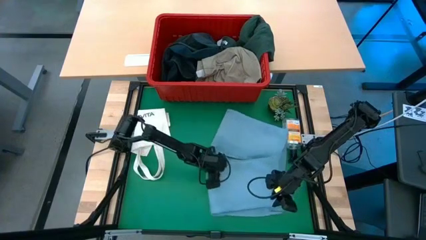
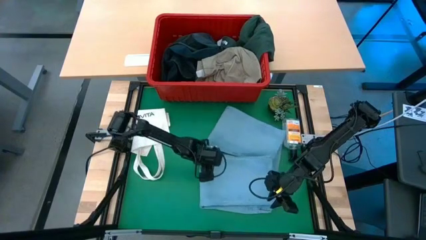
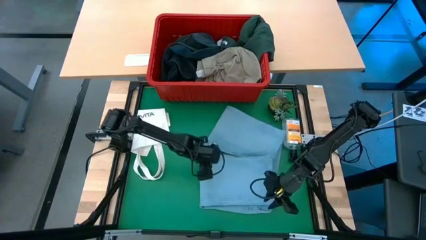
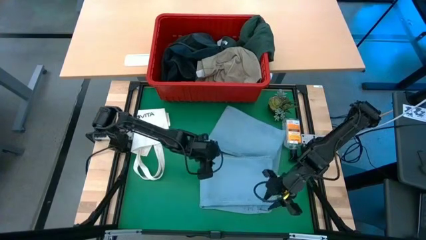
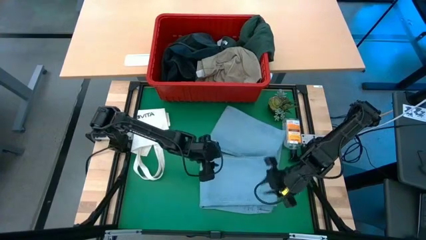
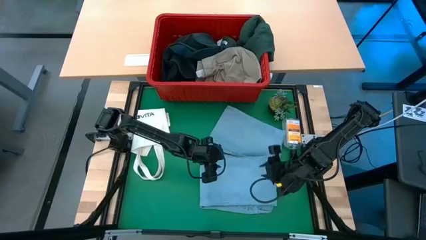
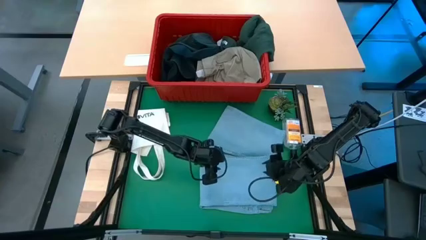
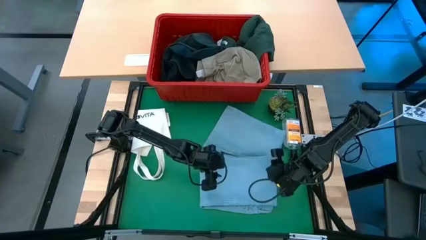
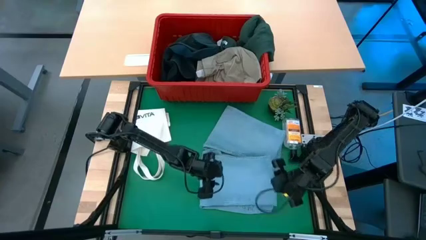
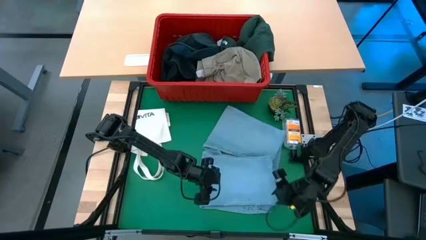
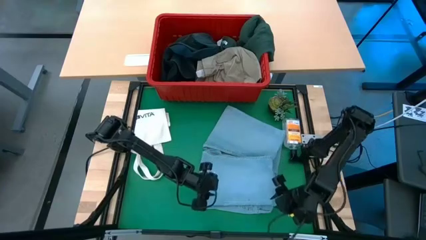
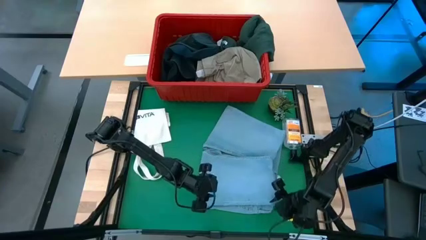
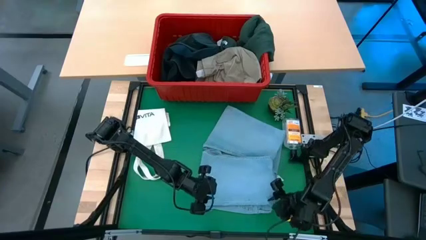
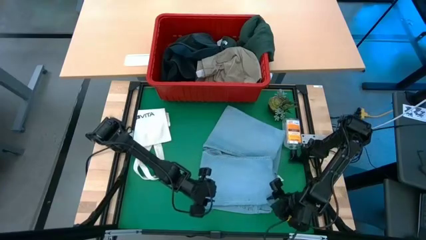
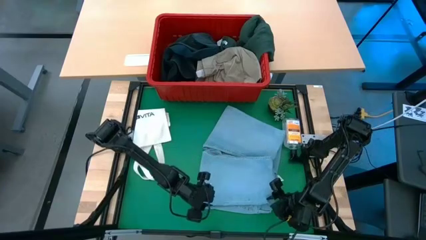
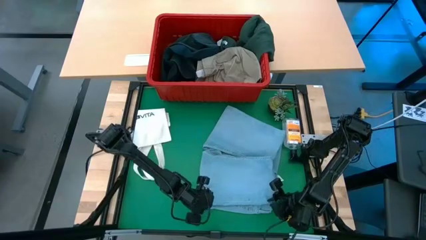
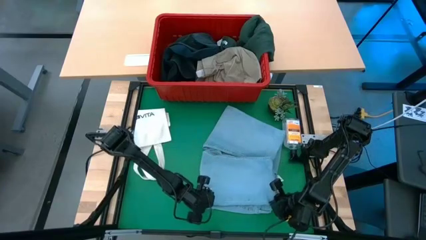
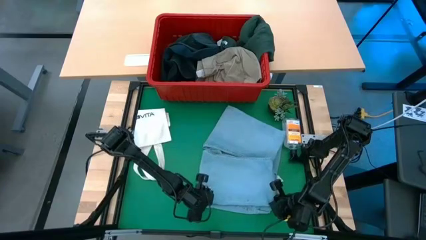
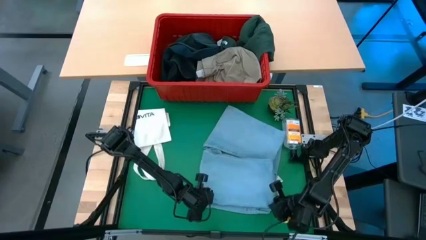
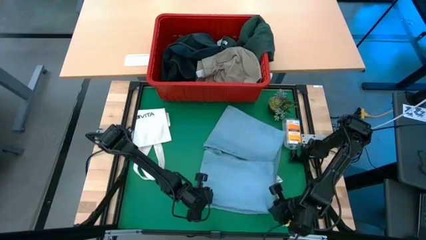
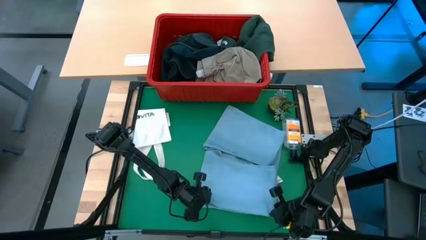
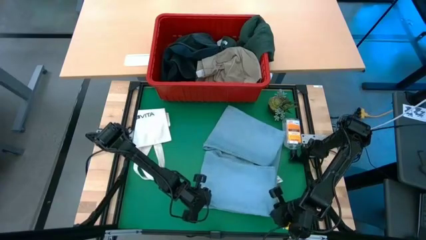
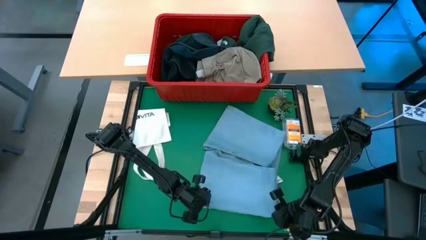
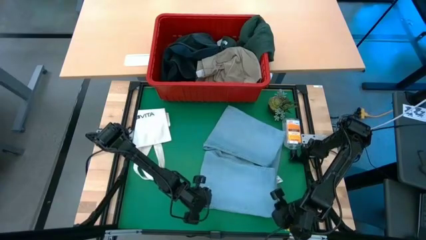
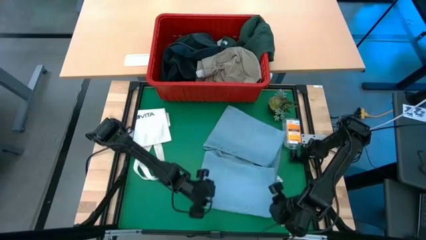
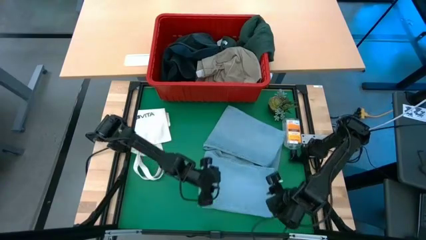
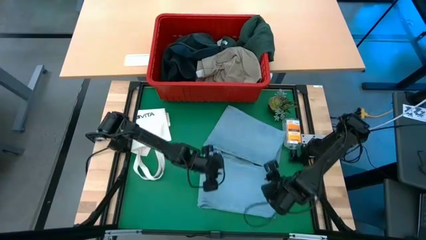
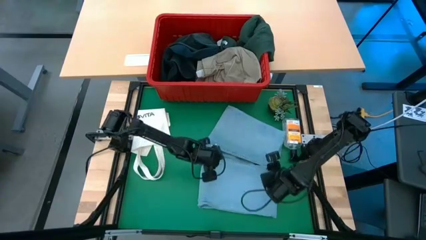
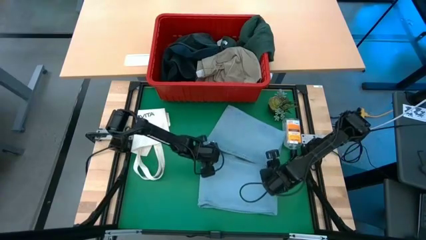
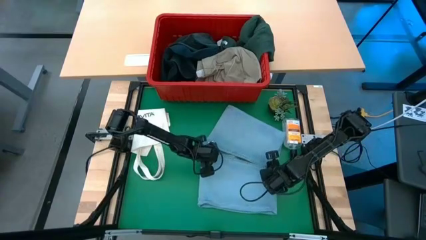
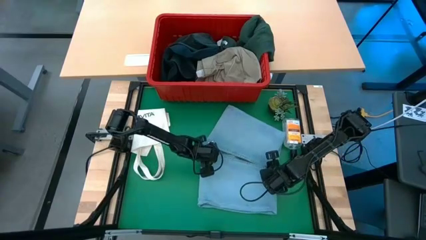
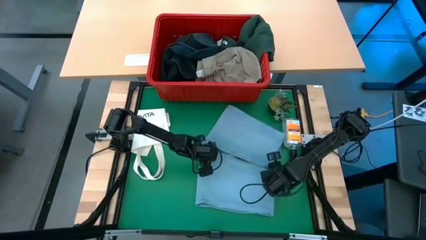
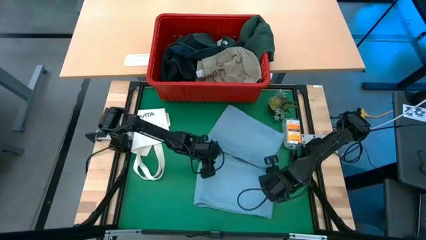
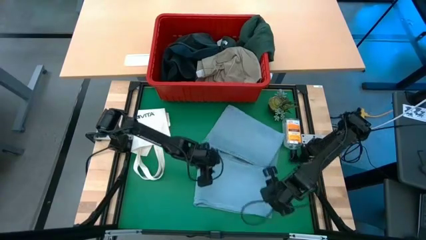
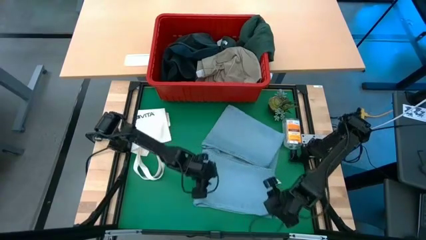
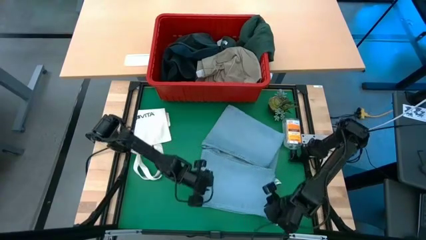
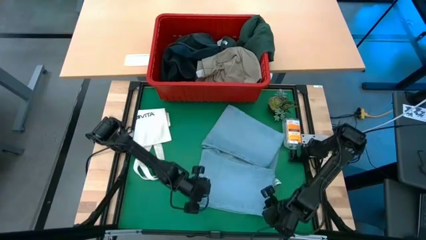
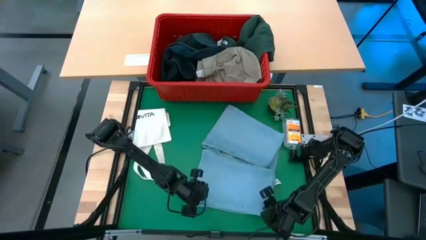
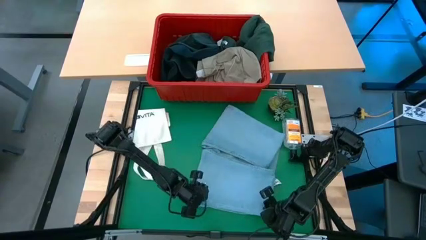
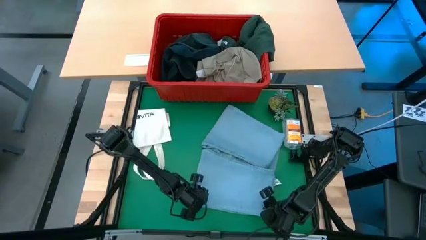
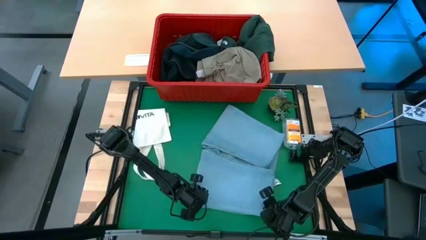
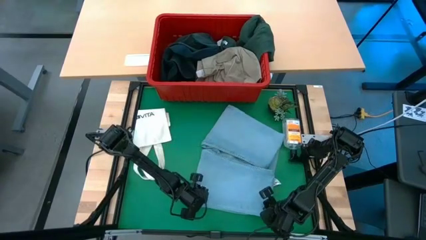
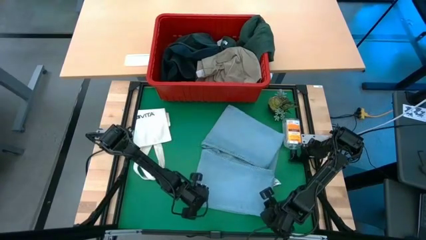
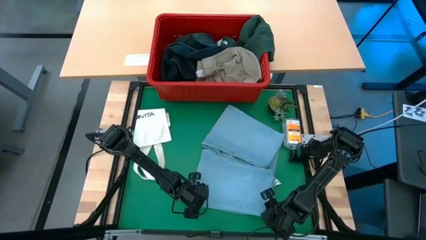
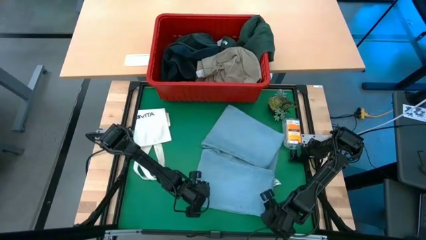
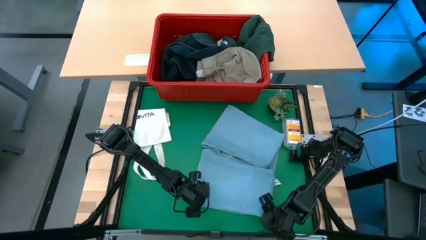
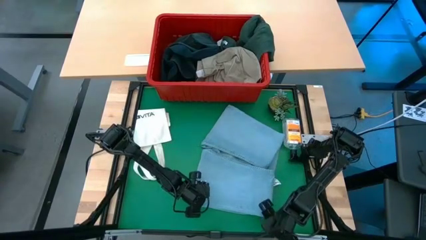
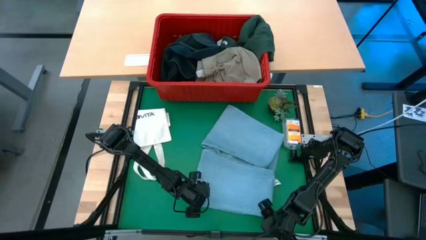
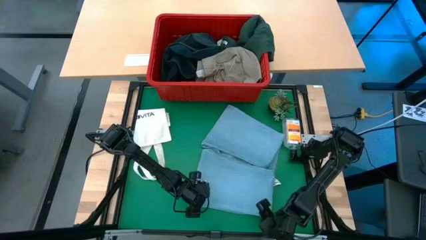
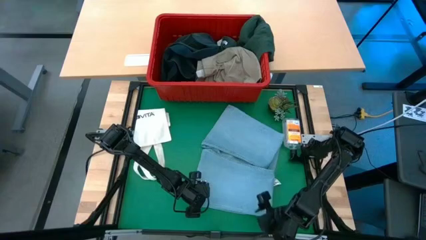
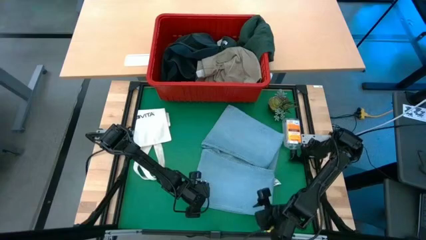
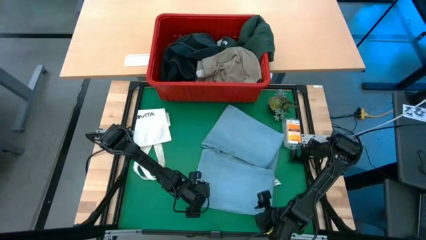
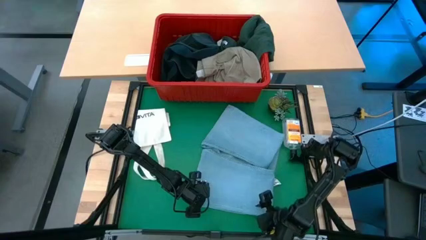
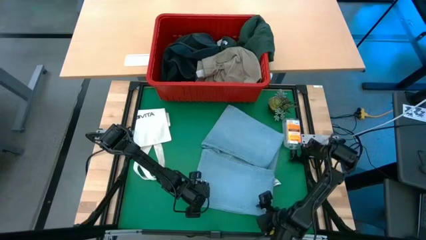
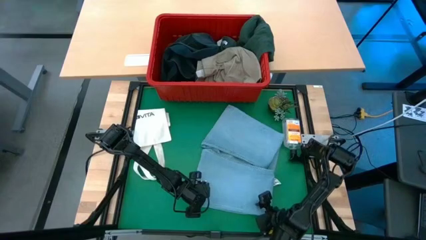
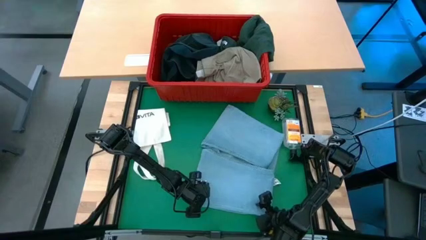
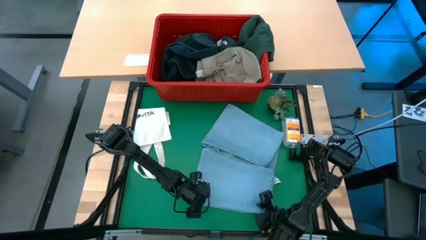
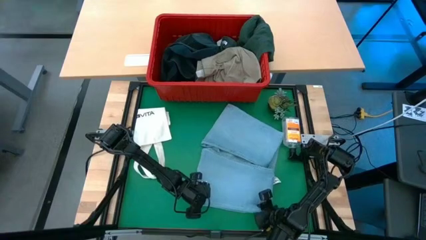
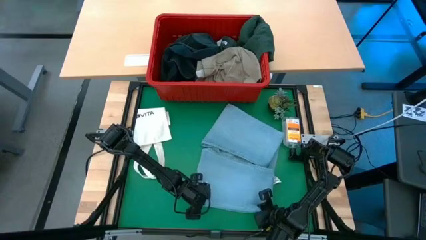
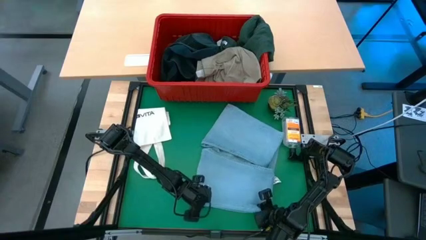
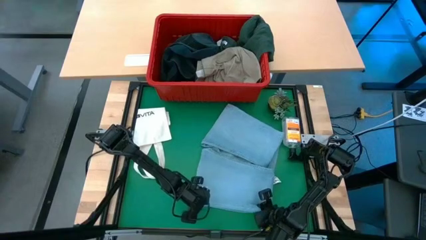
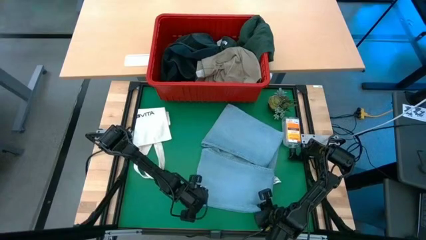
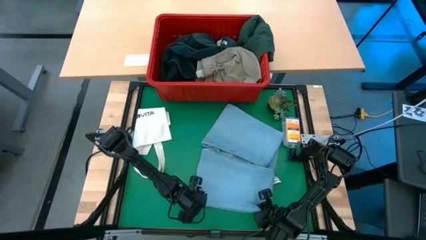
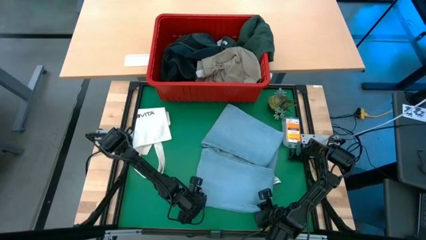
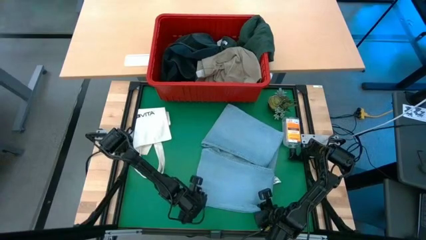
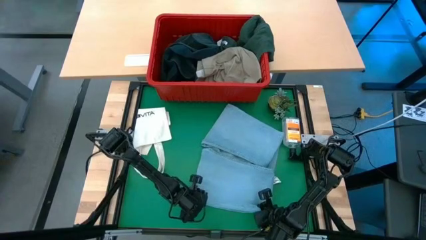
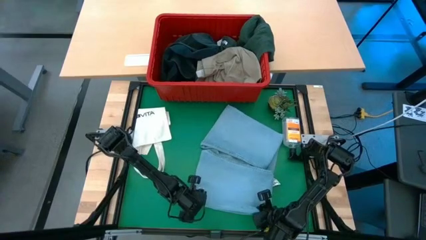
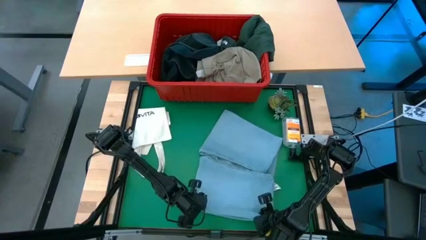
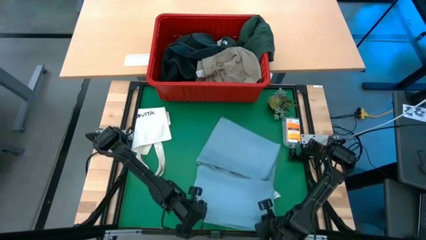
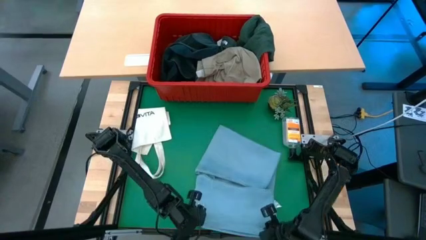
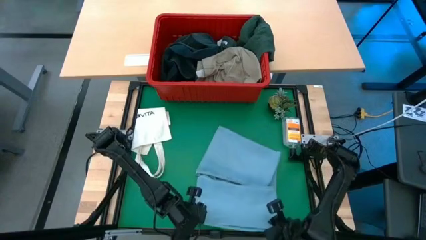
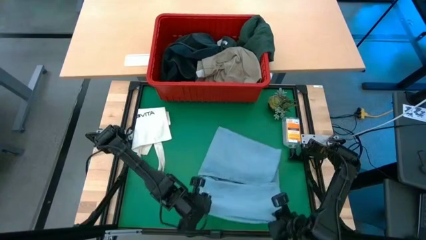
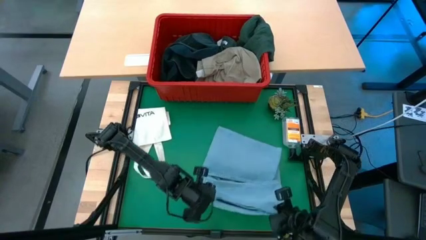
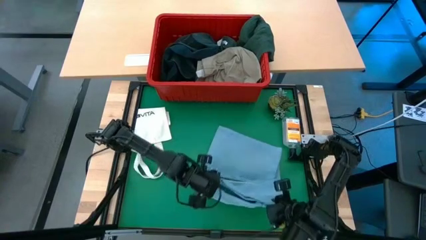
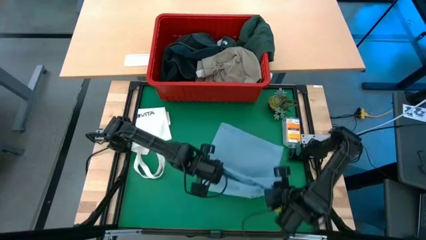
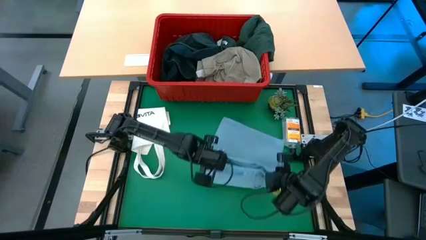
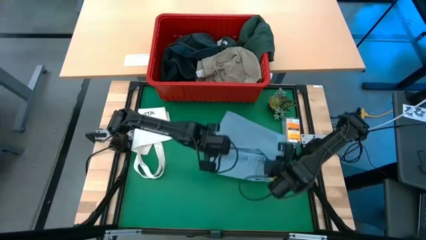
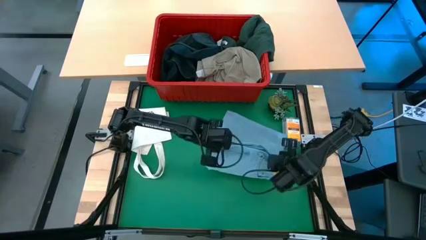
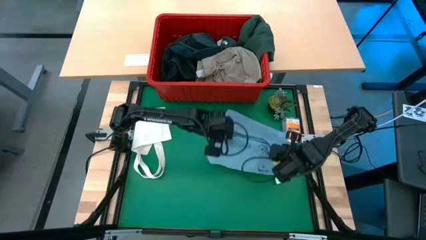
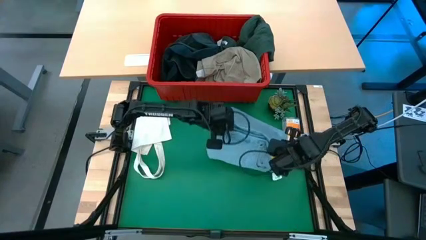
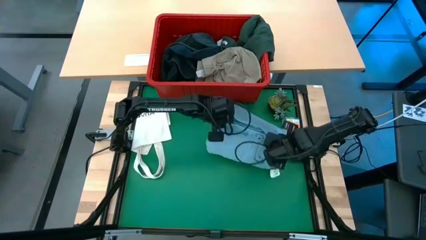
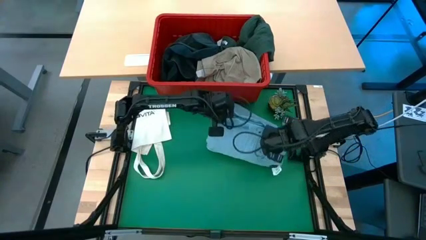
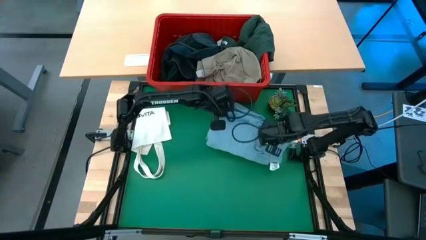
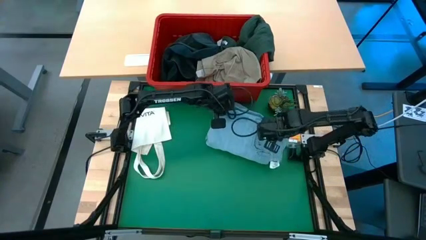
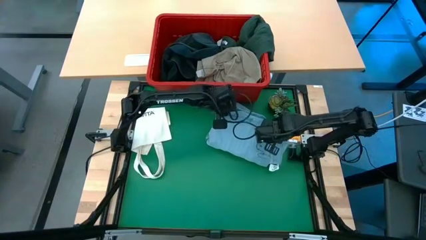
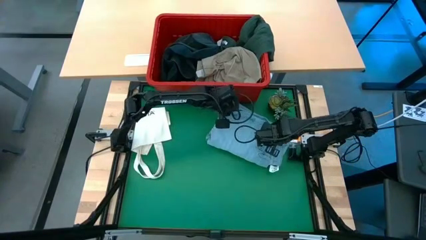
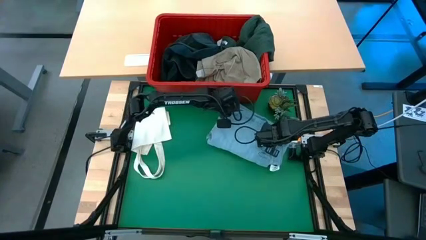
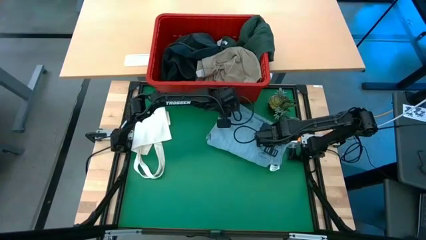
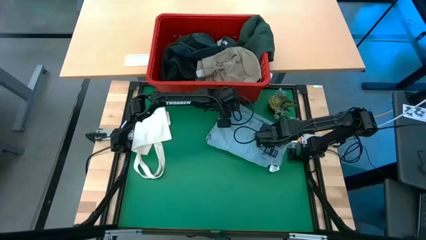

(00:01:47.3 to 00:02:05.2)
Task: Fold Laundry from Bin
Fold the light blue jeans
